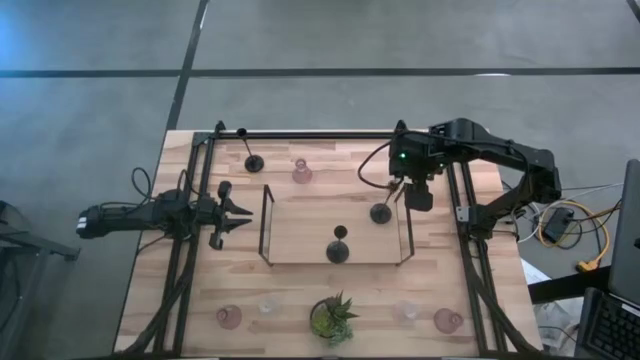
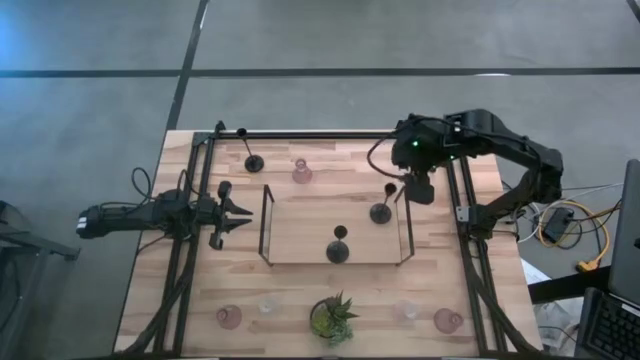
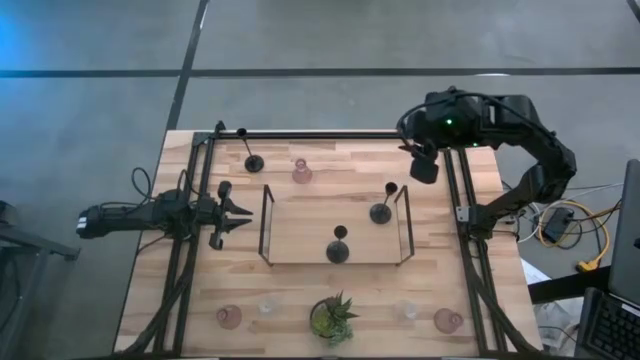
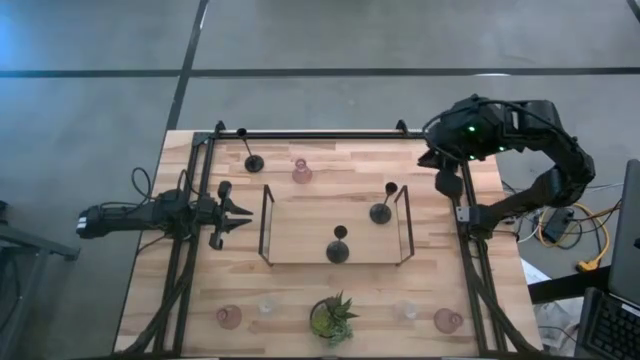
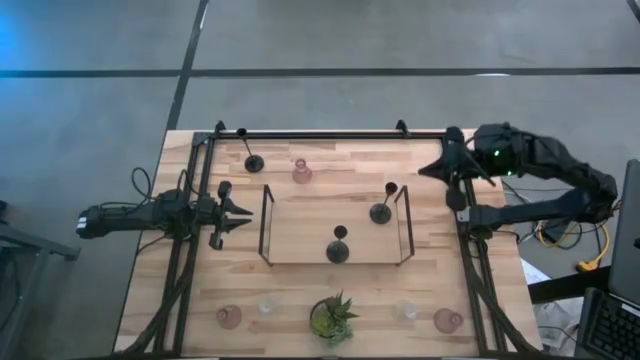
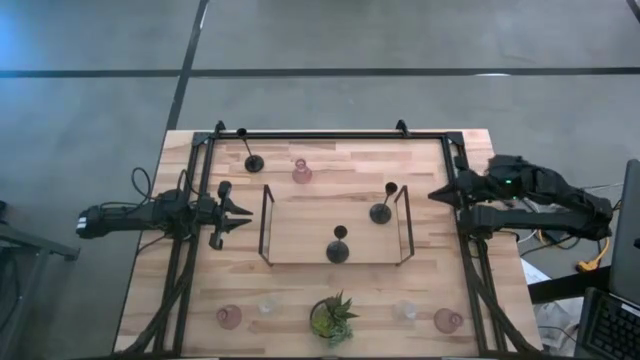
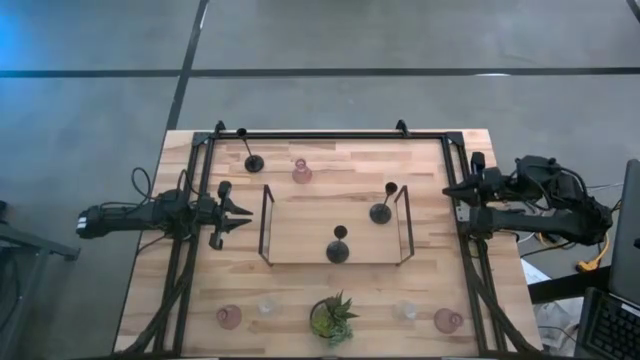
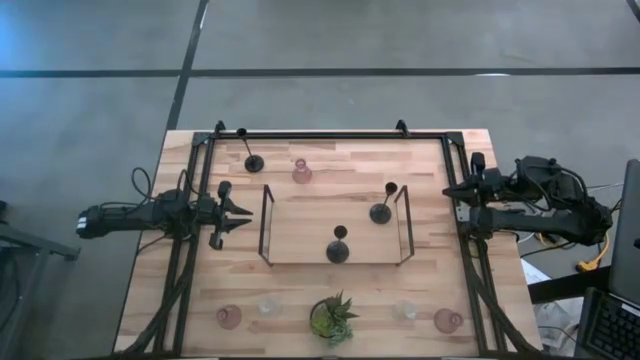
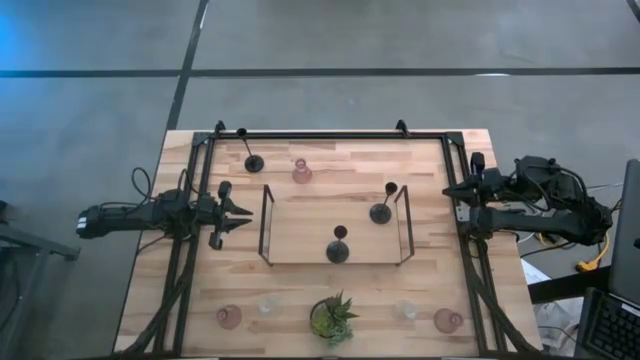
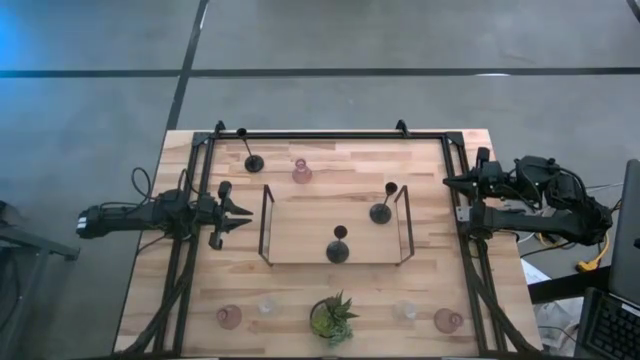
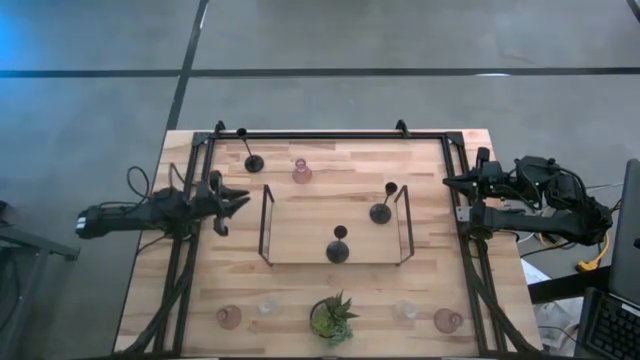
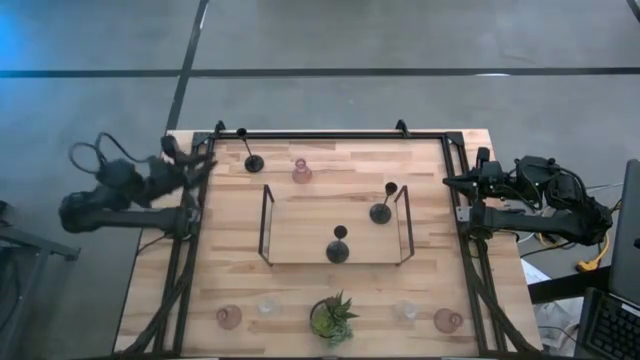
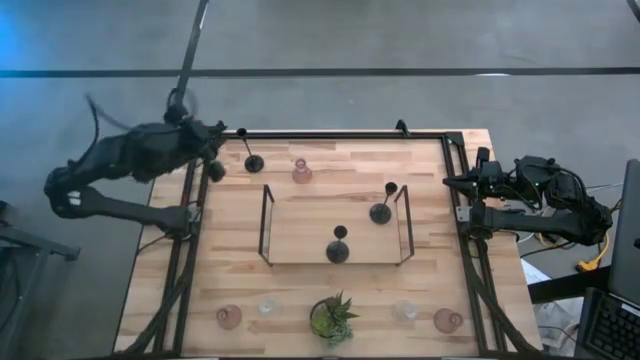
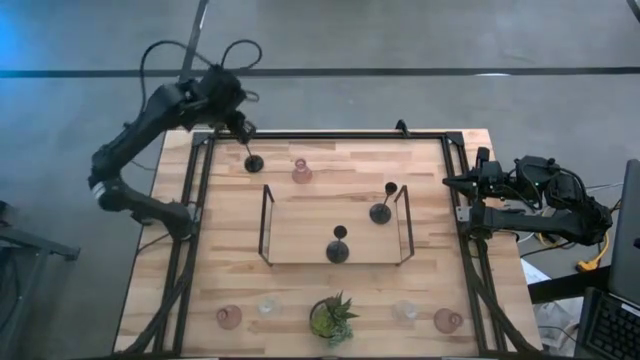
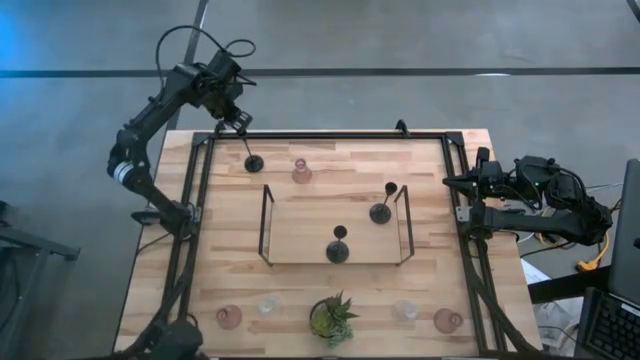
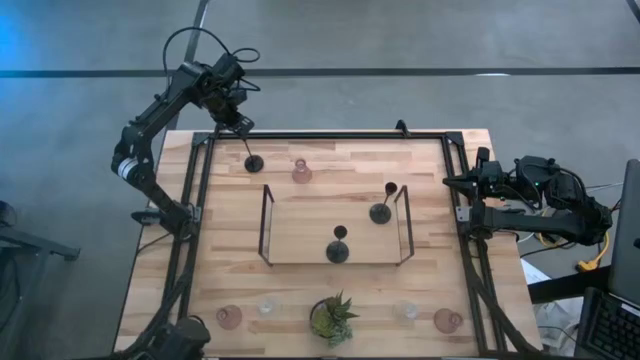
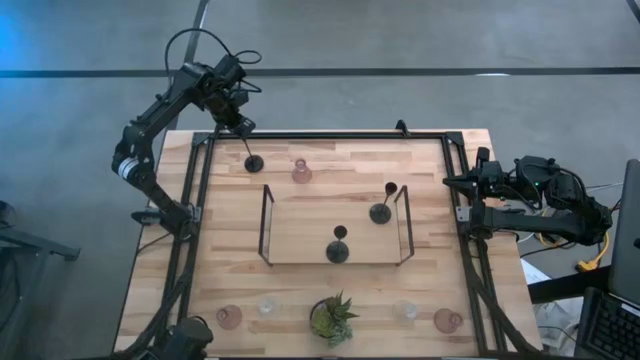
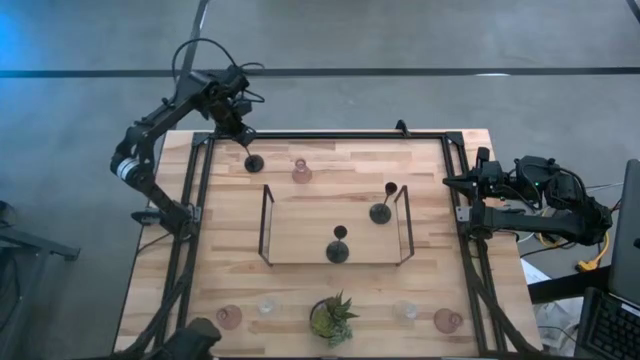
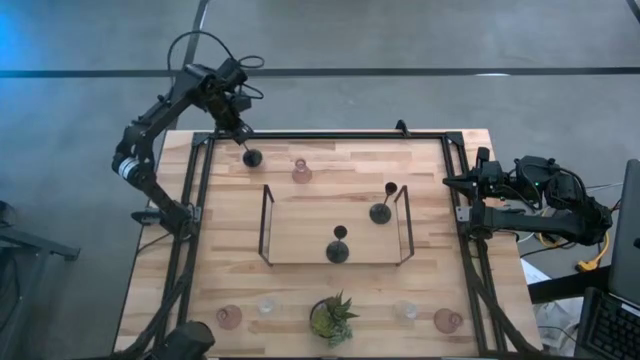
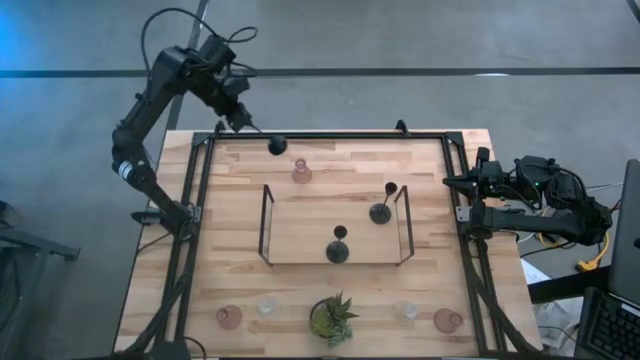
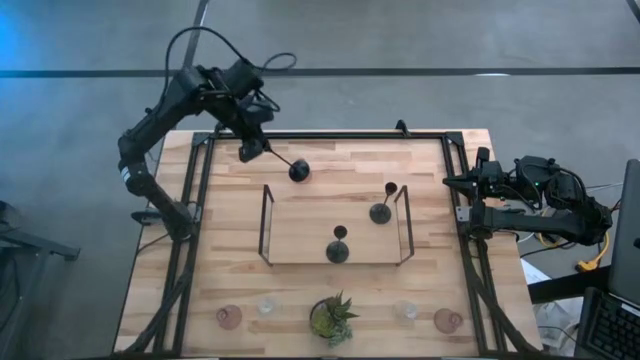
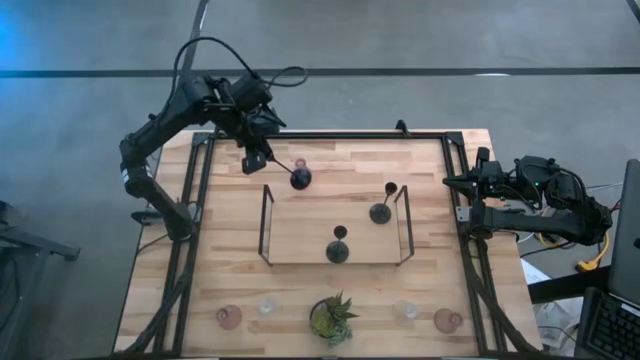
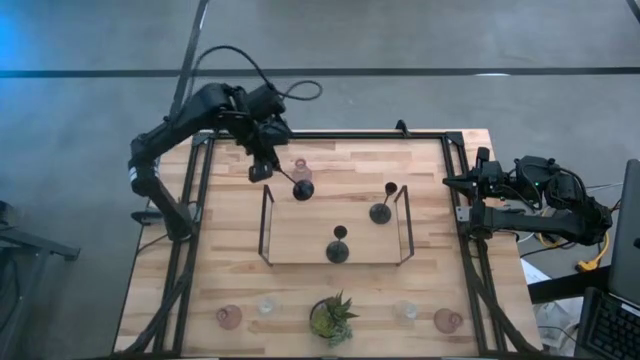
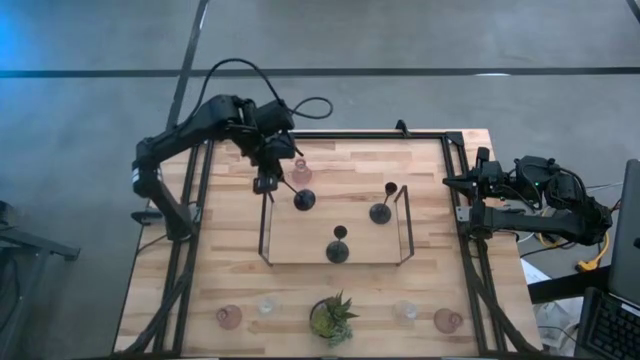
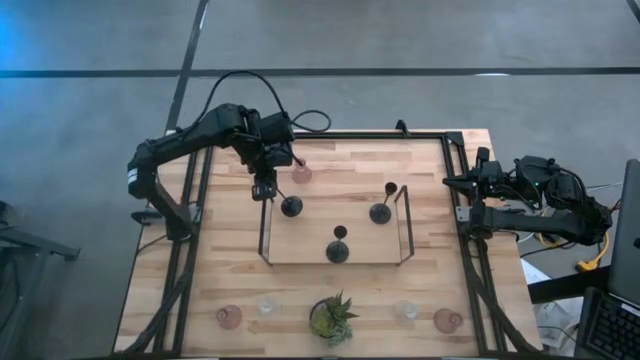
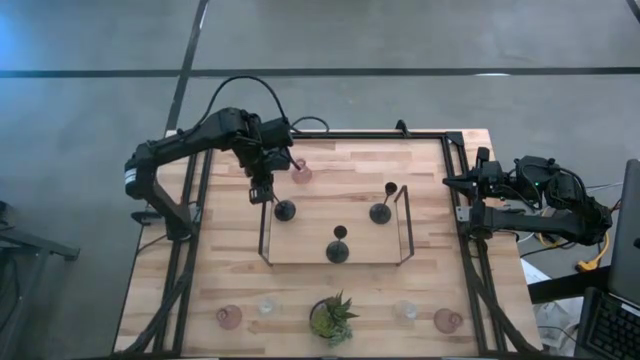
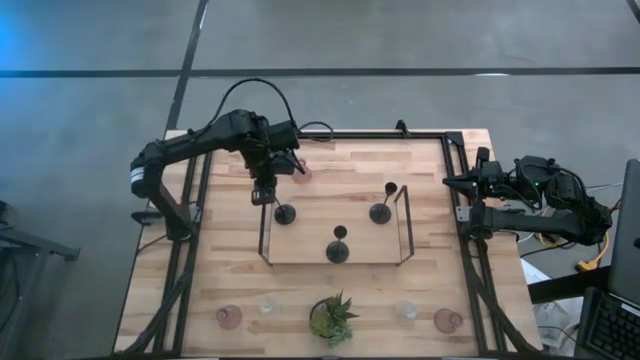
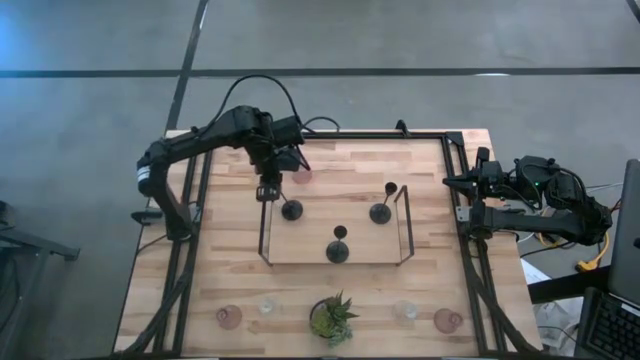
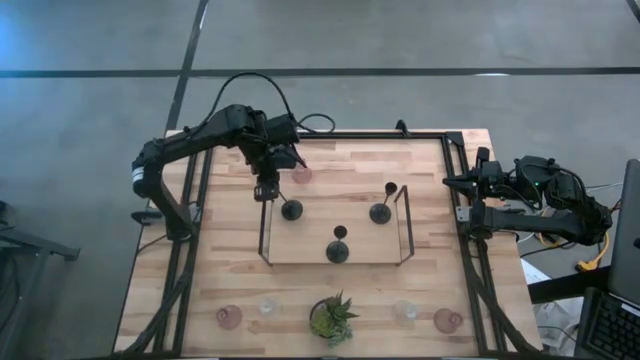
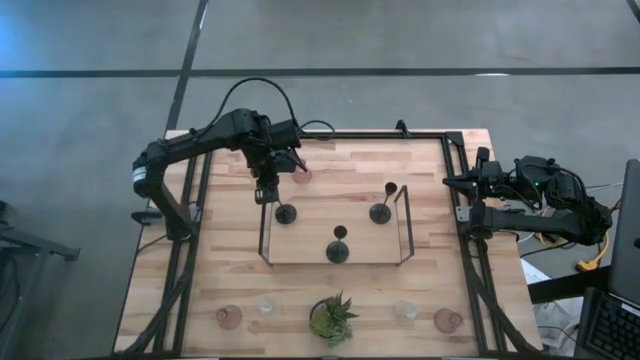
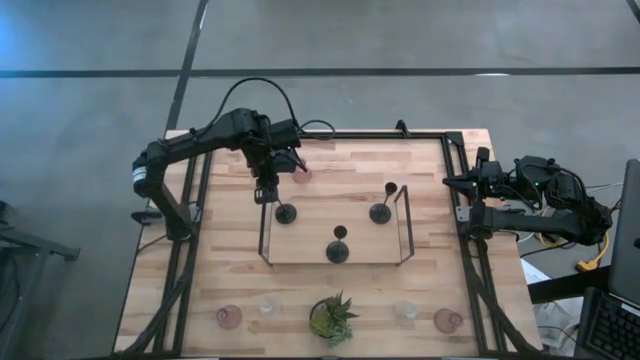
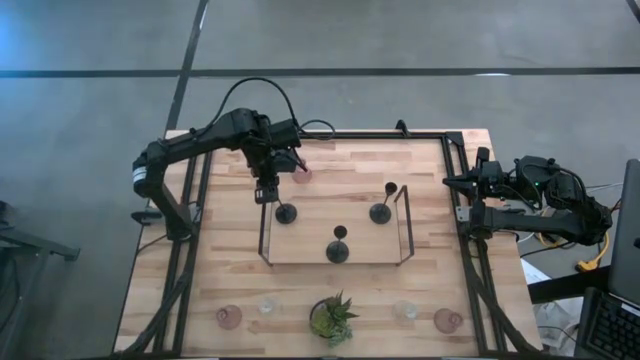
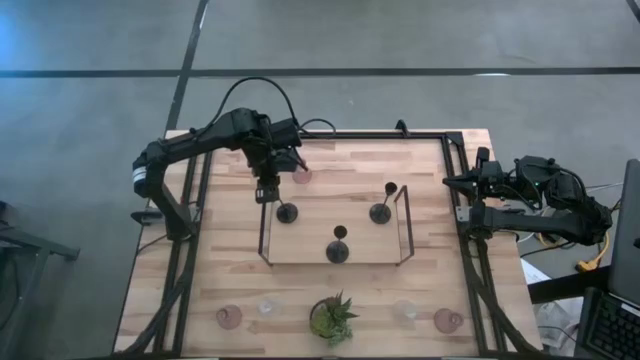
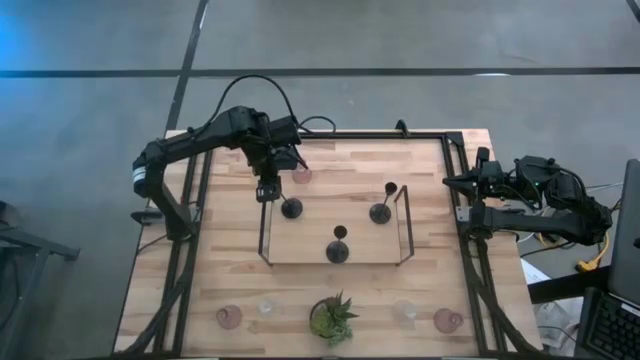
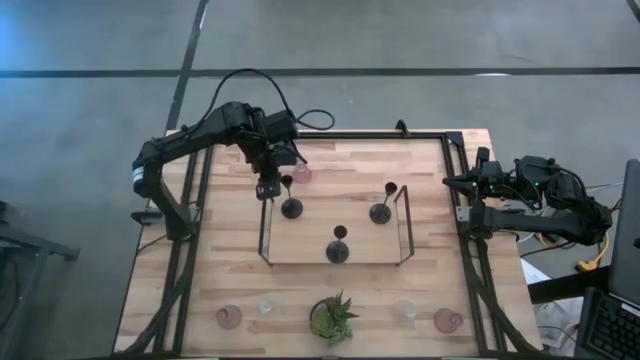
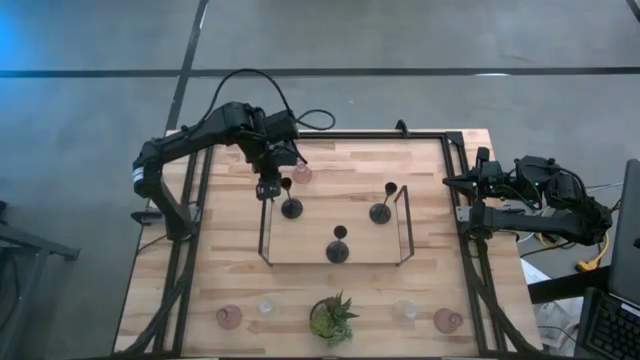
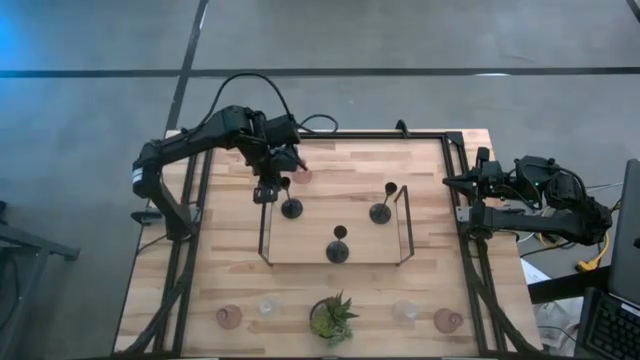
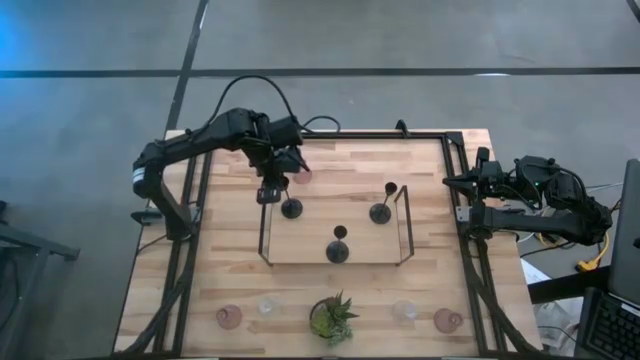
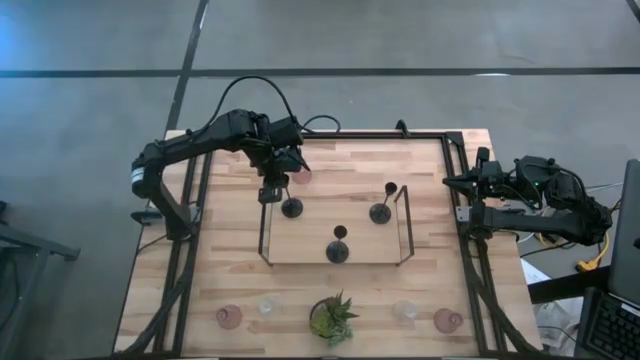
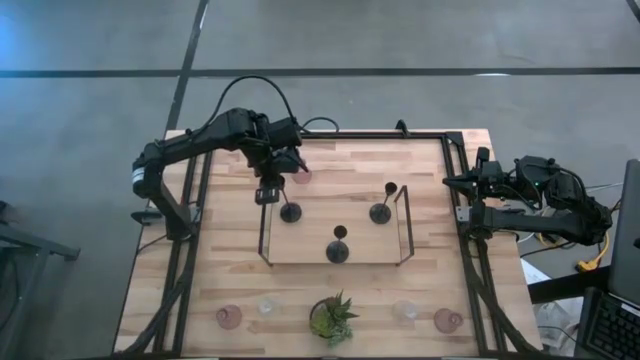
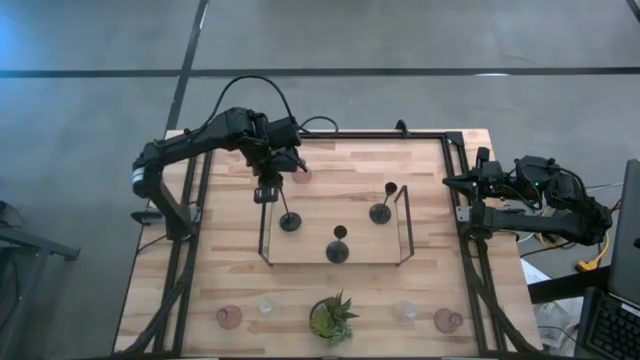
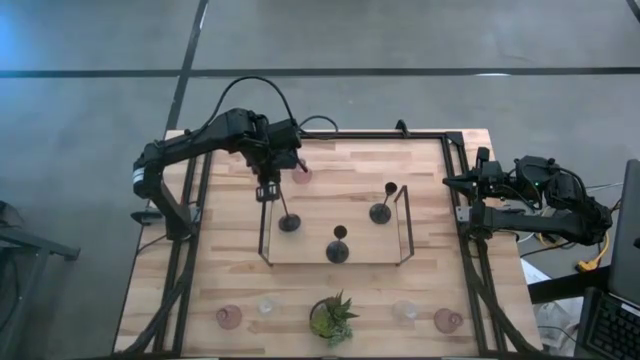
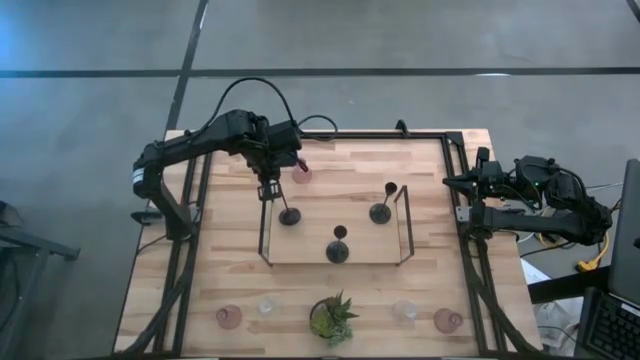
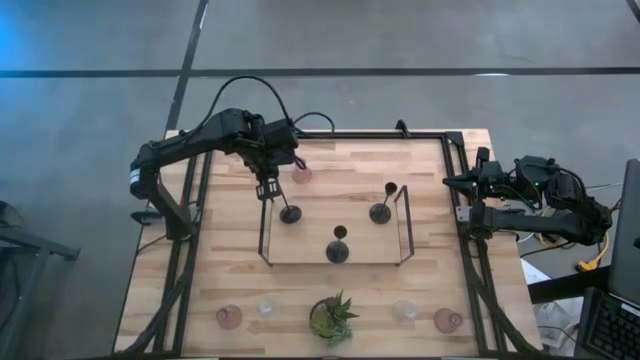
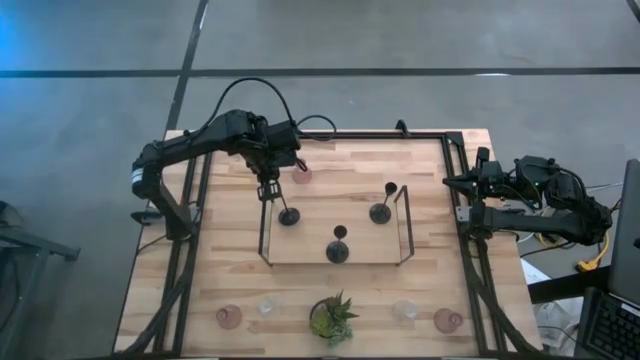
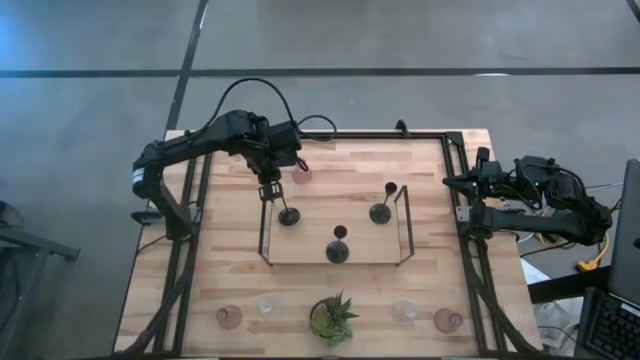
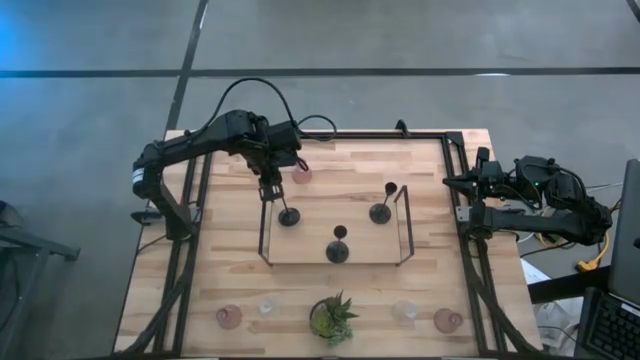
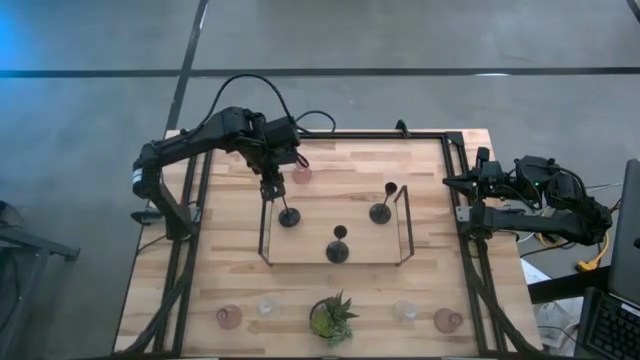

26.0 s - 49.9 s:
Task: Pick & Place candle stick holders
Put the black candle holder on the shelf
